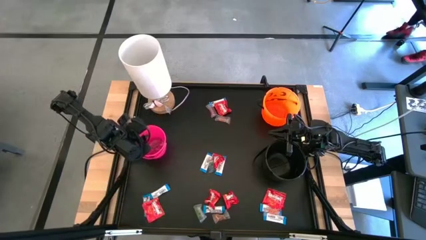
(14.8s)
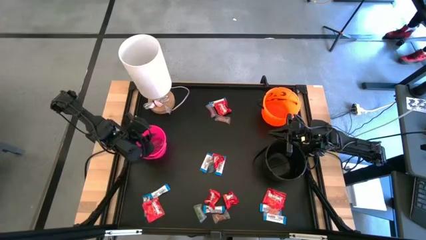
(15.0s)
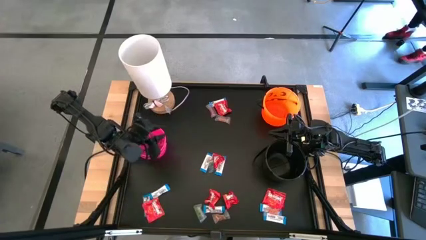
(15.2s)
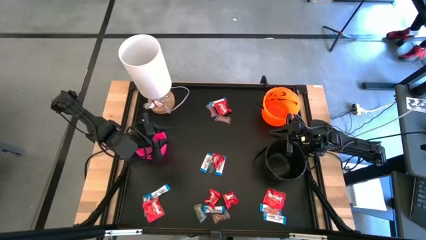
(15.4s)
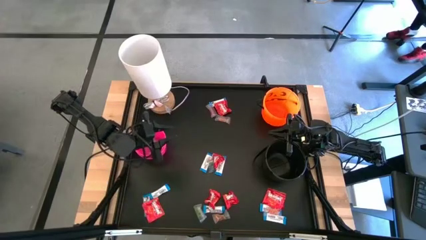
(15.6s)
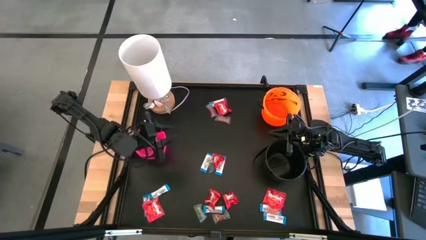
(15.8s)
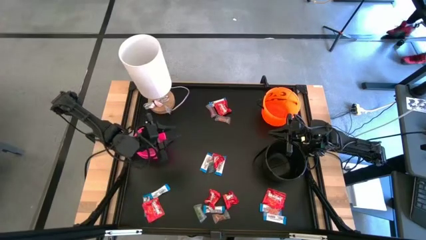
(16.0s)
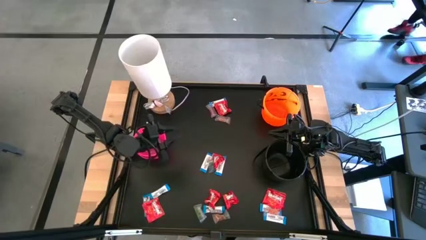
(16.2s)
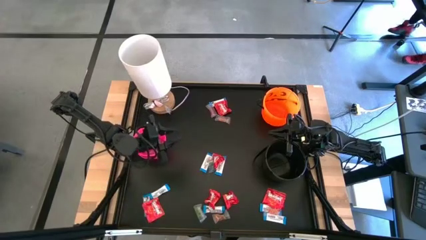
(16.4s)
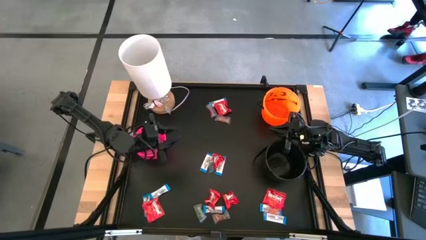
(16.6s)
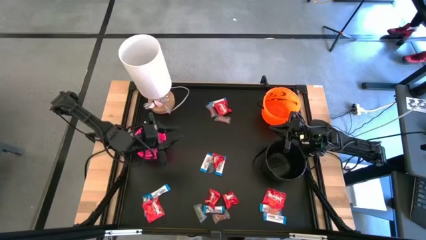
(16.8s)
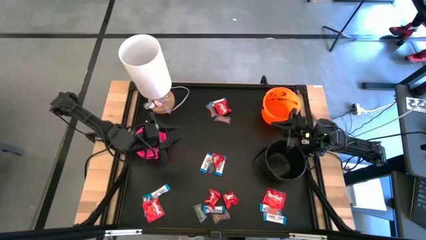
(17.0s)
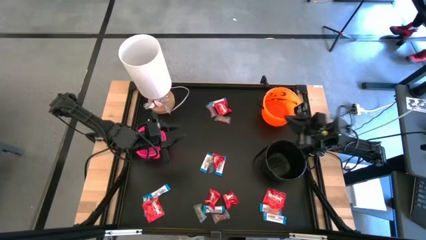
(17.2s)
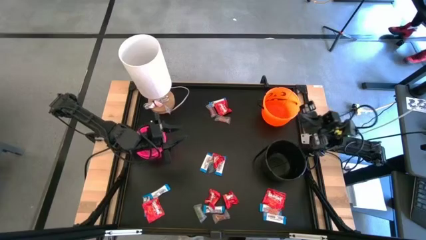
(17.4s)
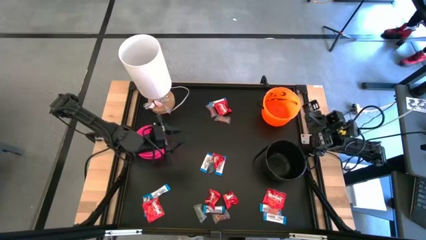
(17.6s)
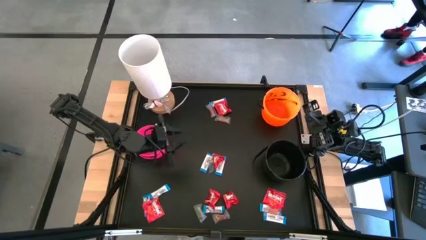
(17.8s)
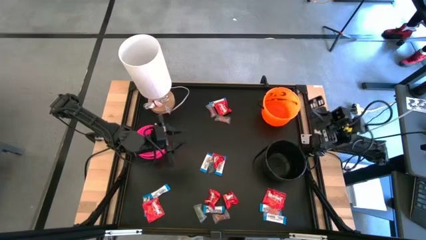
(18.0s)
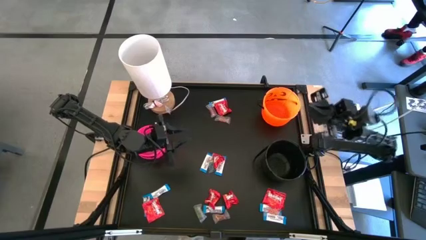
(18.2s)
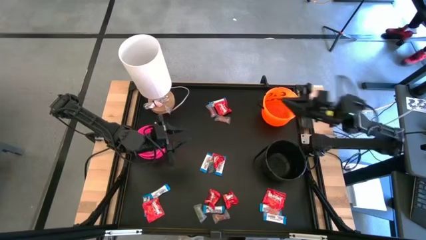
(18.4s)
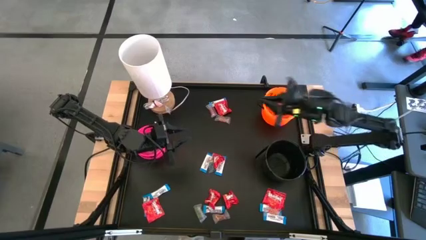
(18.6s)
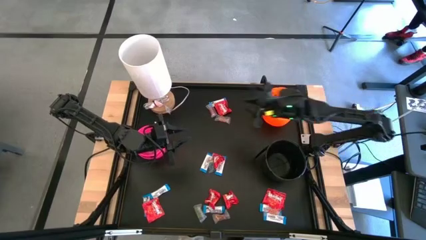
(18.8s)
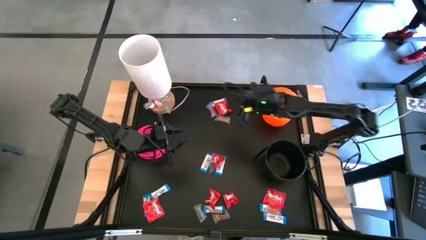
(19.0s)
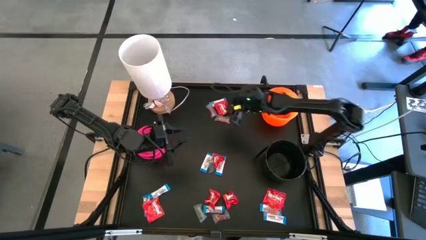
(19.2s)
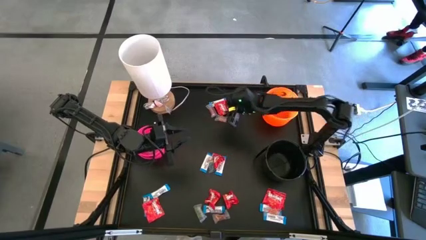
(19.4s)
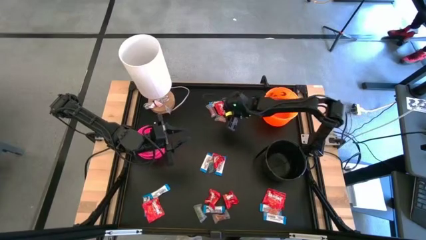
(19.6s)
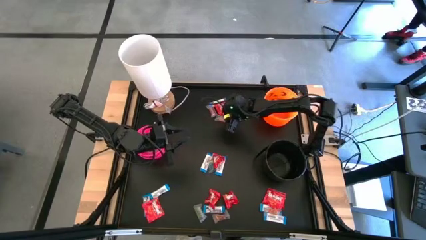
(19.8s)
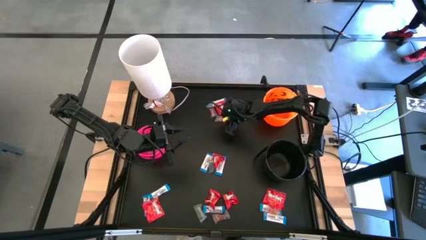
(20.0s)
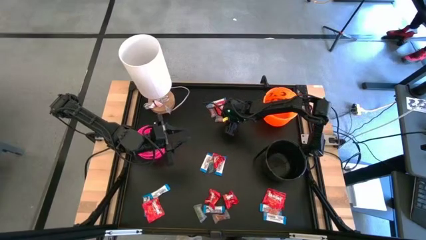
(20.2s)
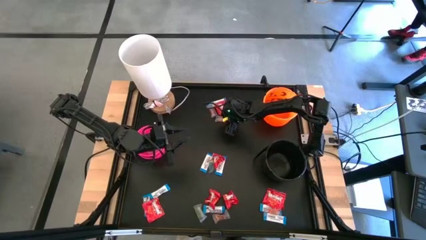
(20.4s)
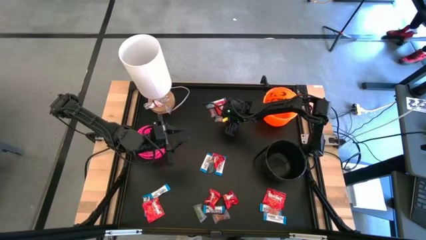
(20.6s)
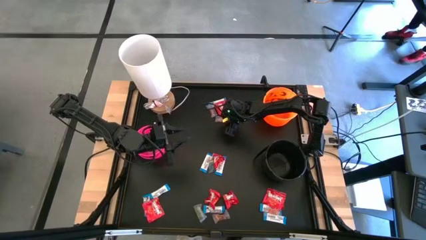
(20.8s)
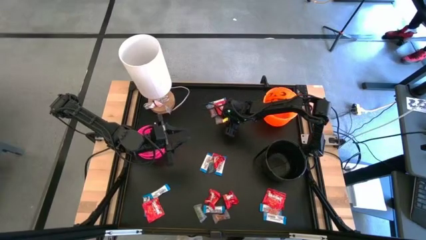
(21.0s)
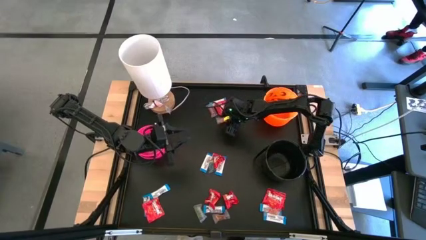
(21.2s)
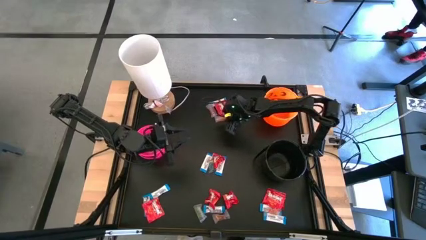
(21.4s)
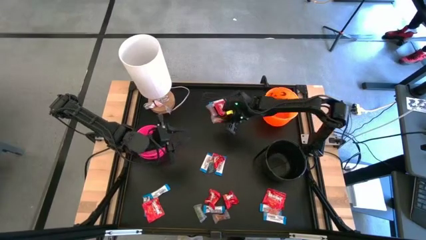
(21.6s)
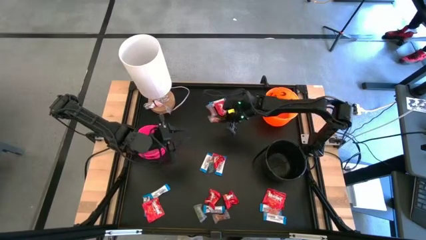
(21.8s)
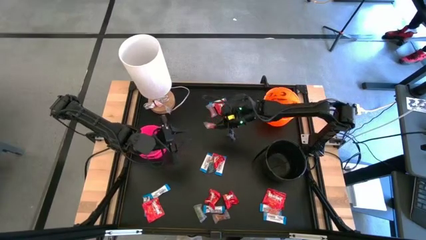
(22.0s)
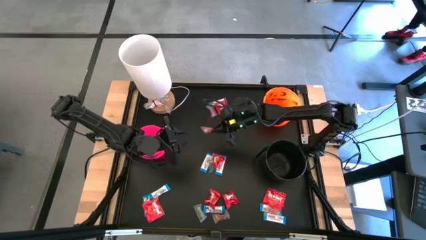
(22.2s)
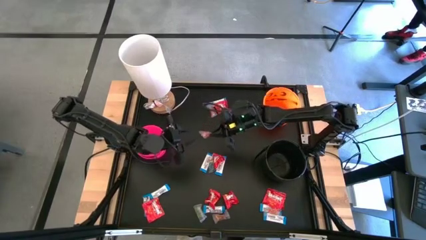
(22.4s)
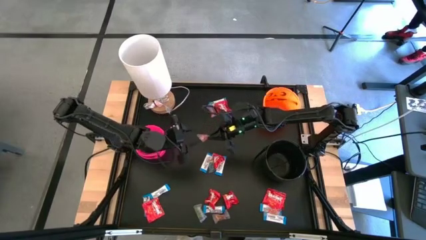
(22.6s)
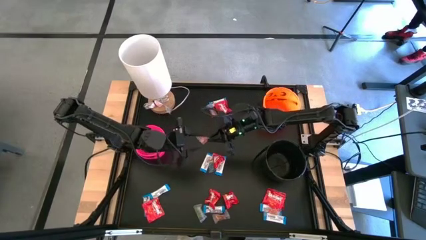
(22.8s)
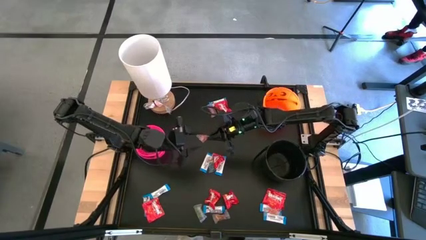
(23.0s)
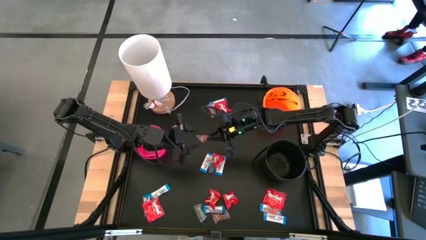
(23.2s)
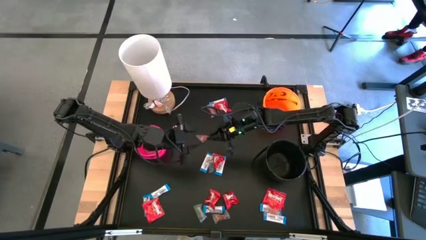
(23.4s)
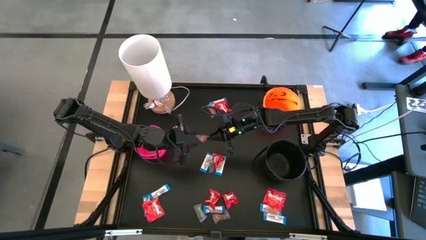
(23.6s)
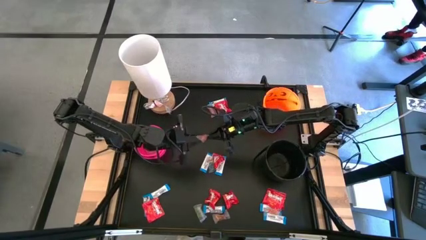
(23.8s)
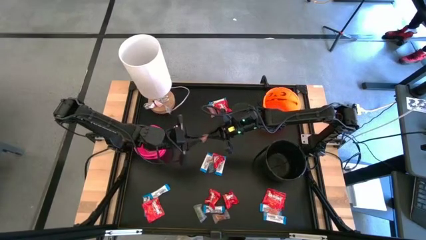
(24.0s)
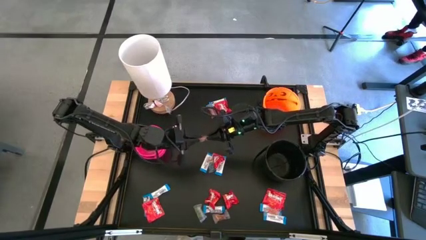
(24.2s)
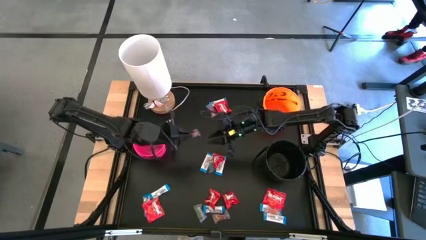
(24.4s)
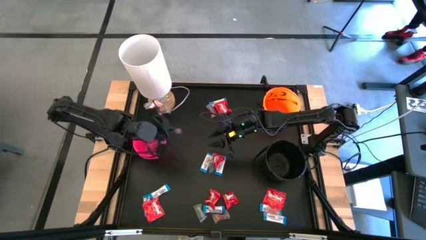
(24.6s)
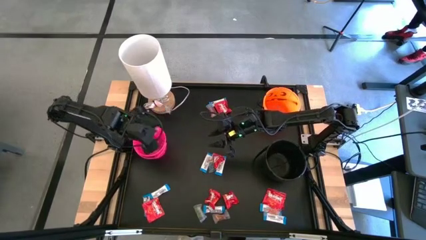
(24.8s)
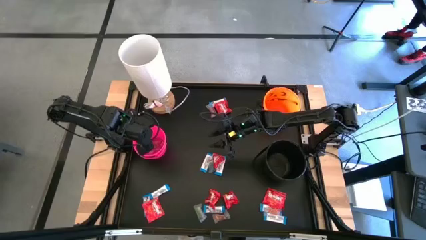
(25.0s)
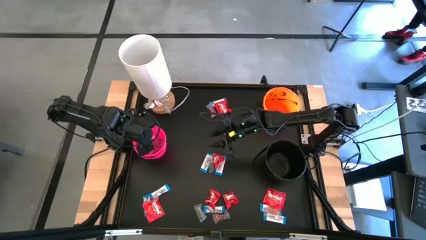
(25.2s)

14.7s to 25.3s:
Task: Sort candy
Put the orange gummy into the pink bucket

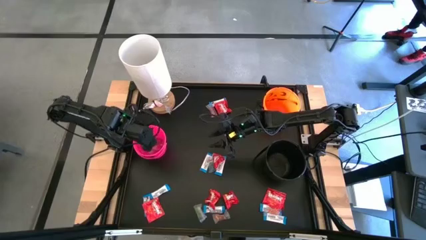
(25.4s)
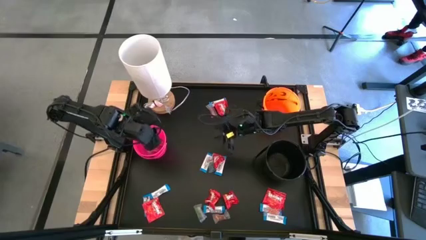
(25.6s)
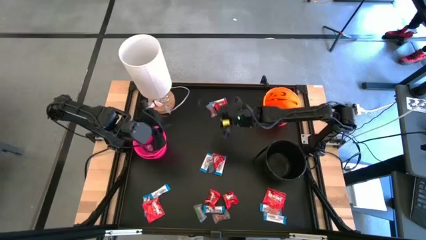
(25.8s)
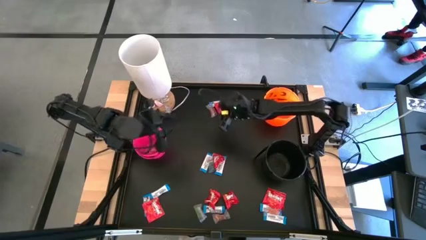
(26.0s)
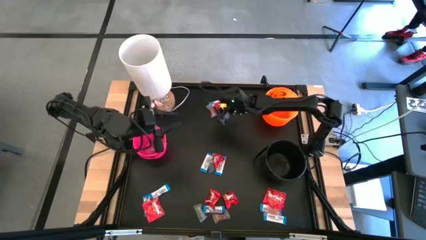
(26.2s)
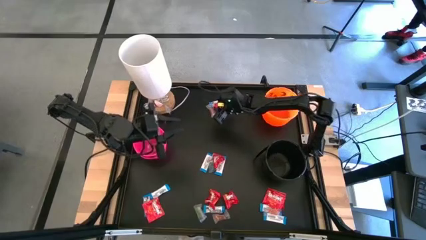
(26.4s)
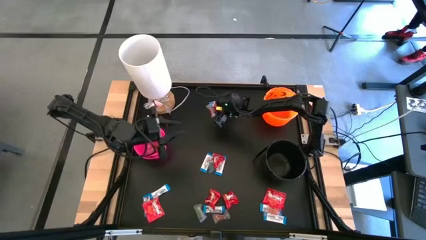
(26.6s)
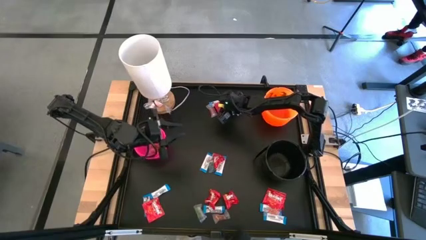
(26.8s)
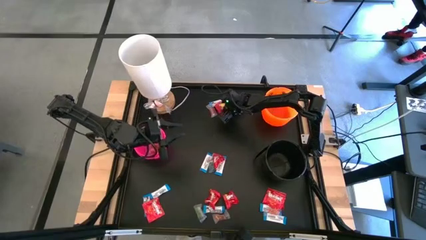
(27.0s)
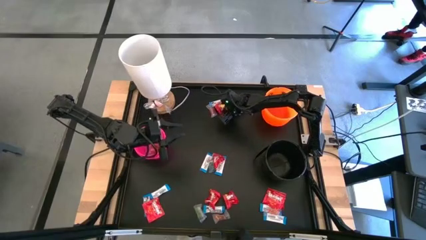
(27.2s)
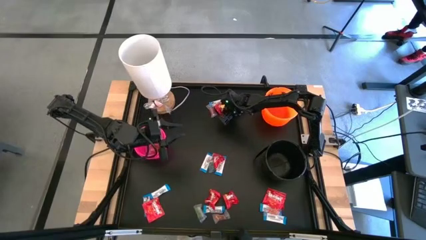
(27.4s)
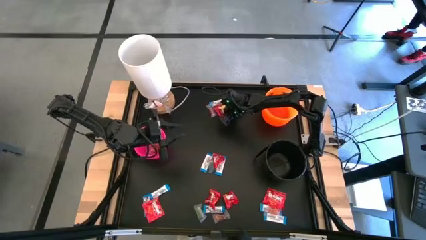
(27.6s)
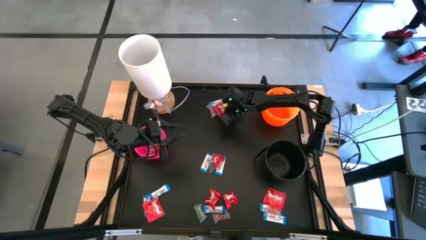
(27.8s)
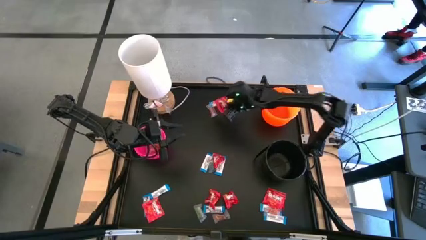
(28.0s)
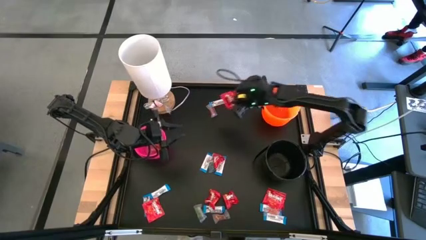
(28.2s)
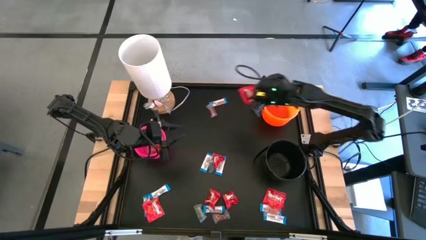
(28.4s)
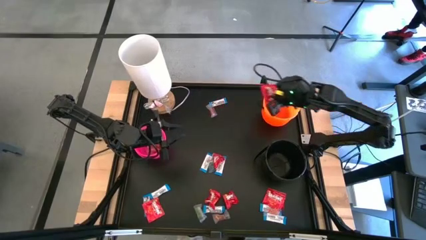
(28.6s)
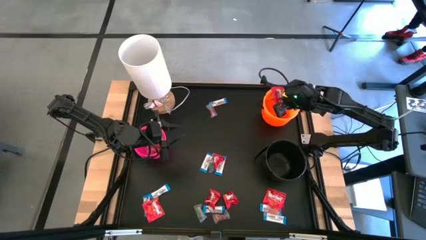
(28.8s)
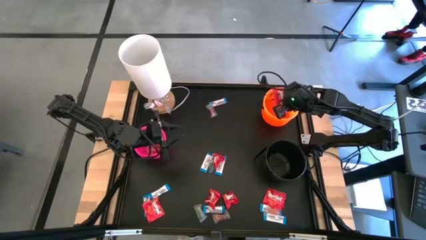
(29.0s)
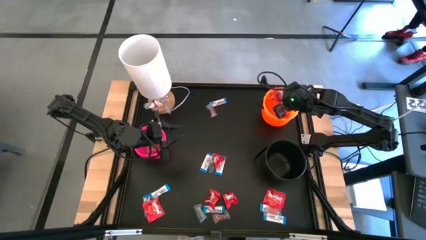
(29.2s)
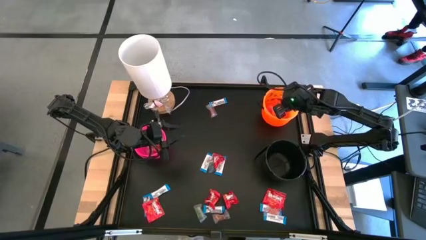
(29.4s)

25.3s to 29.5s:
Put the red candy into the orange bucket

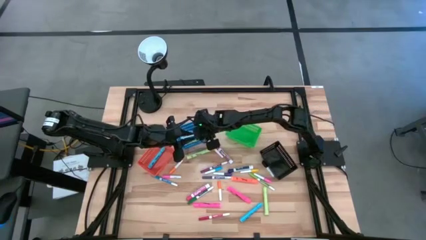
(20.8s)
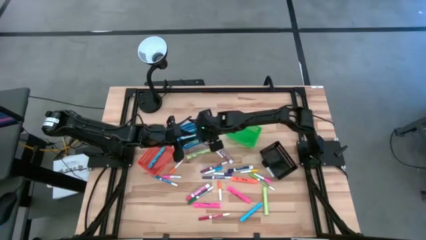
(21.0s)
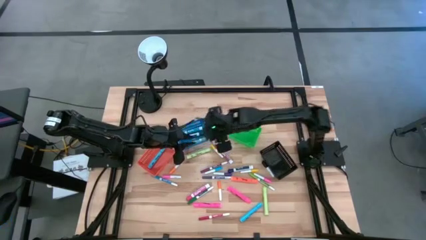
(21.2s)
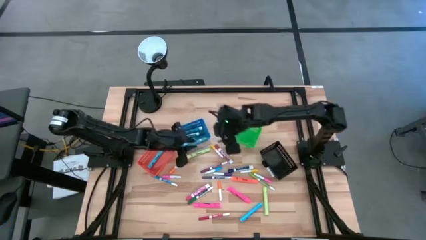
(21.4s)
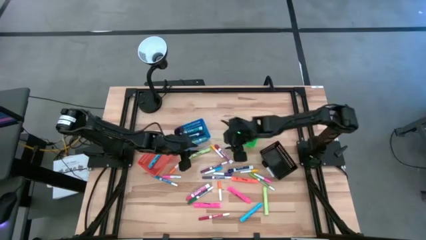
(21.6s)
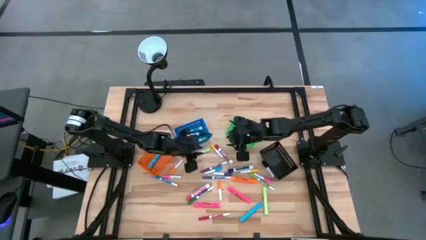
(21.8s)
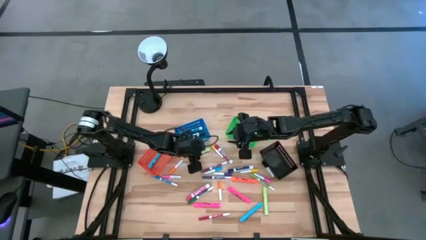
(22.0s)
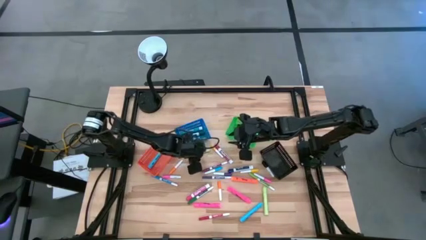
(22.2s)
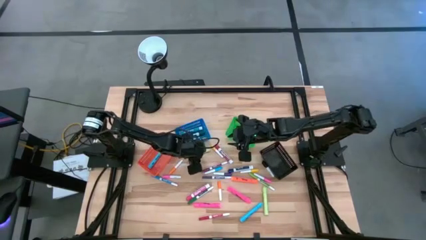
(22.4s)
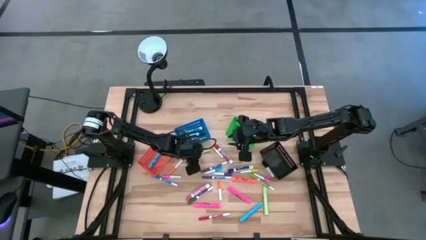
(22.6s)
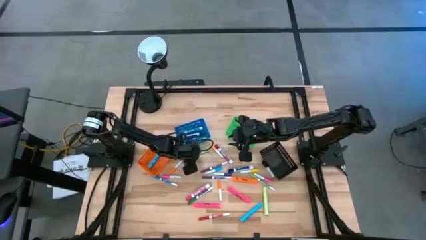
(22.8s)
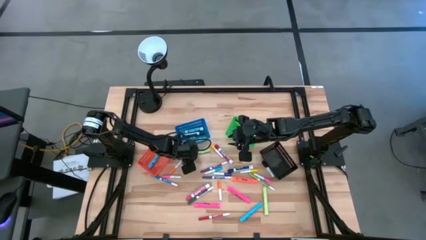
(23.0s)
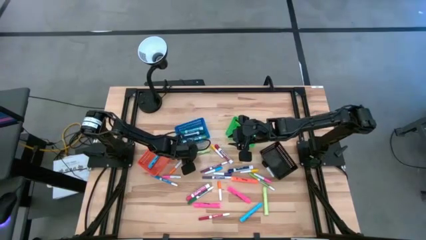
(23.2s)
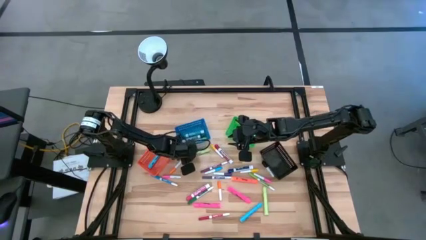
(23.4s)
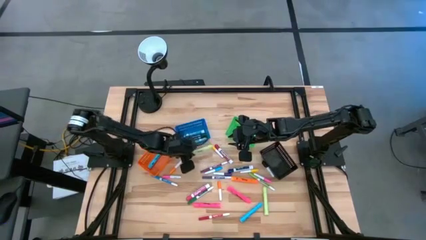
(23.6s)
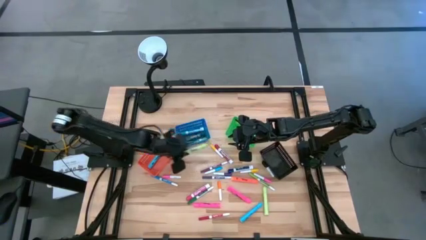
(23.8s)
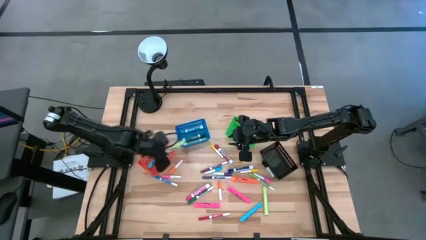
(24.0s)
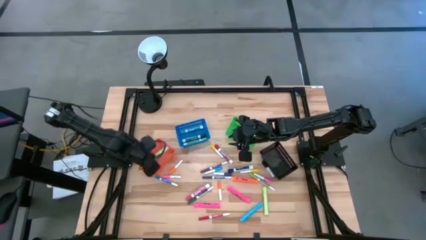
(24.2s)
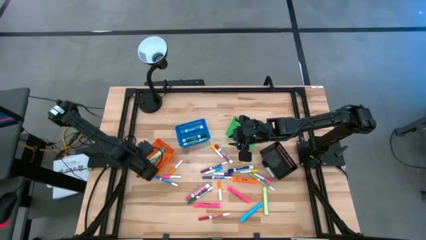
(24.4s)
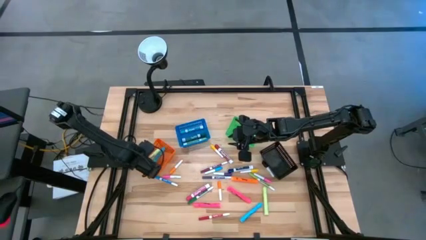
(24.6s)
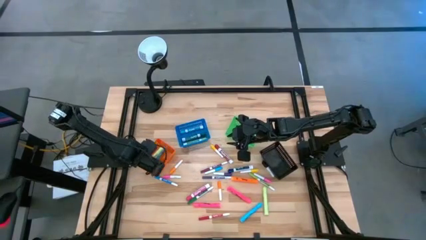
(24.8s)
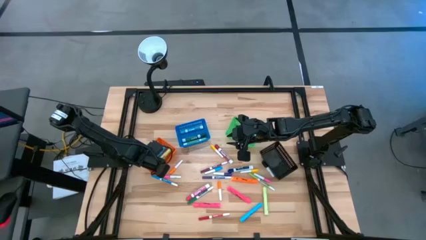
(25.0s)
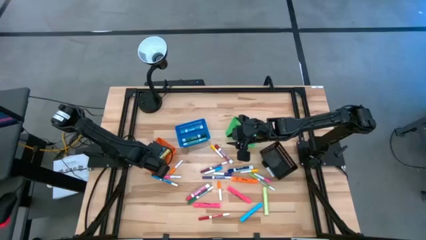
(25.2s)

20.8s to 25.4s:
Task: Pick & Place Markers
Put the left light green highlighter pen into the orange basket
